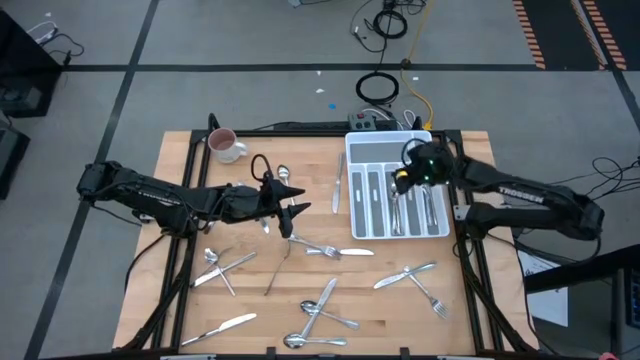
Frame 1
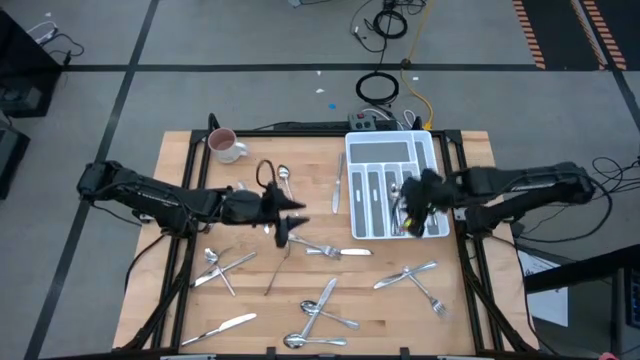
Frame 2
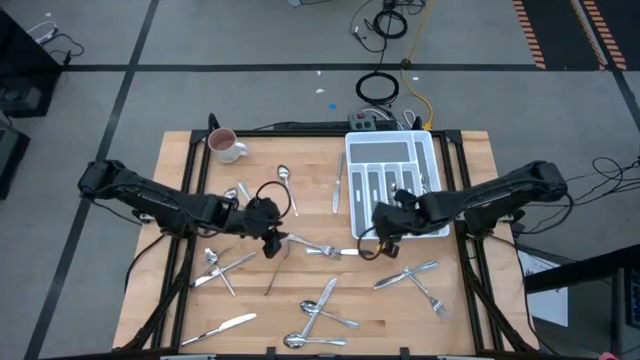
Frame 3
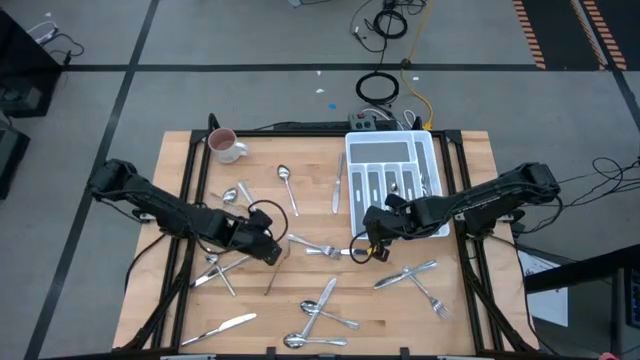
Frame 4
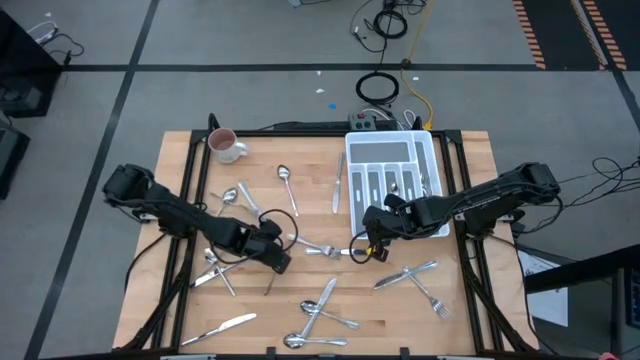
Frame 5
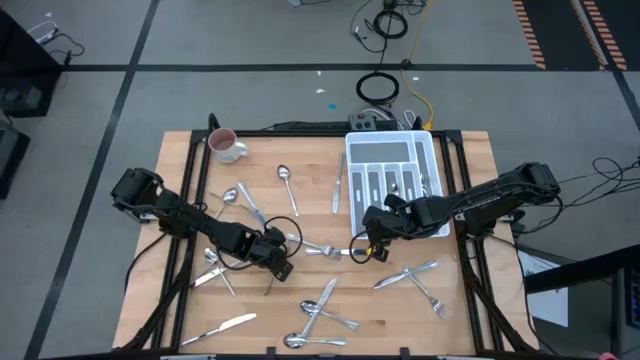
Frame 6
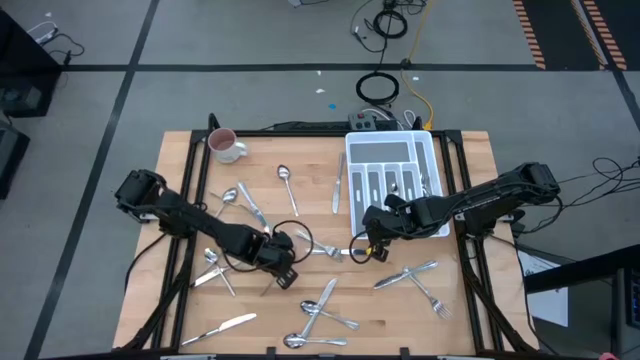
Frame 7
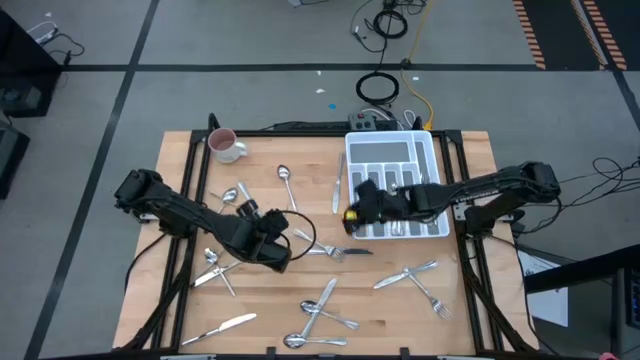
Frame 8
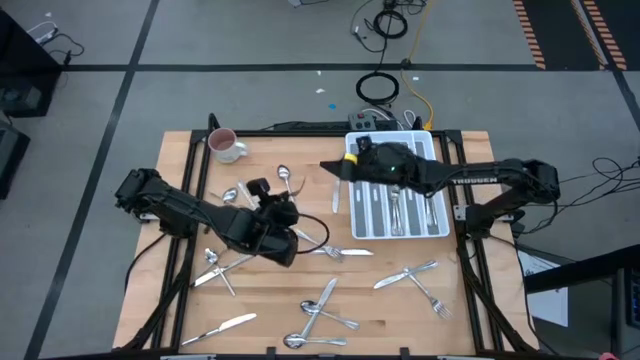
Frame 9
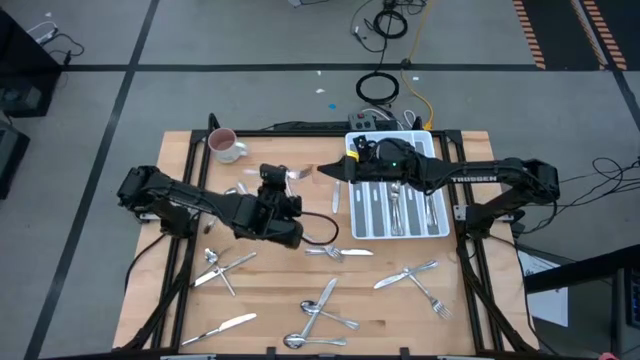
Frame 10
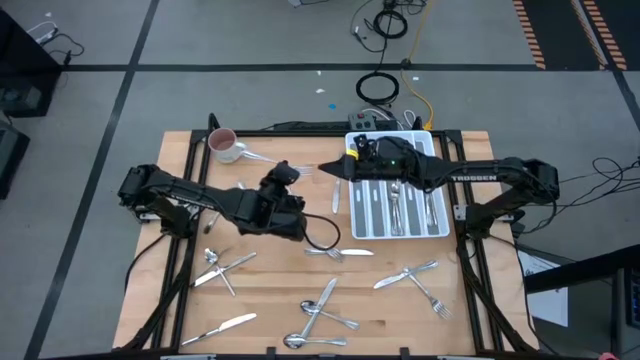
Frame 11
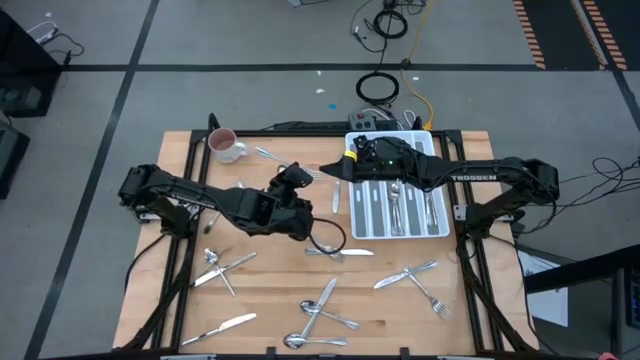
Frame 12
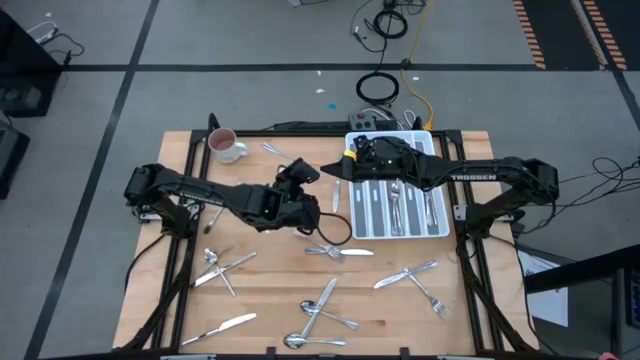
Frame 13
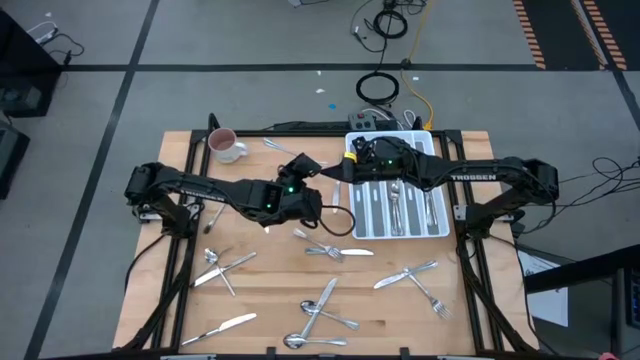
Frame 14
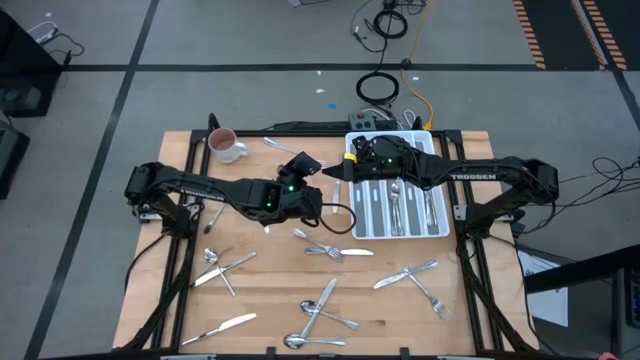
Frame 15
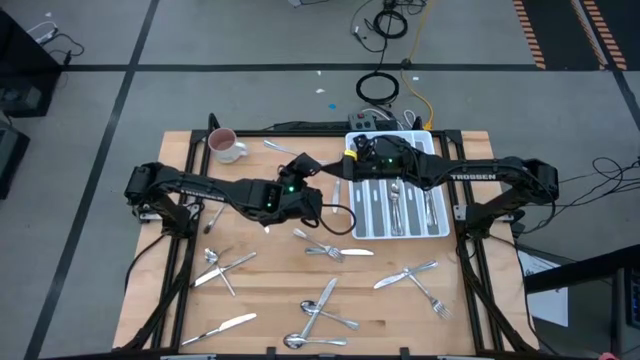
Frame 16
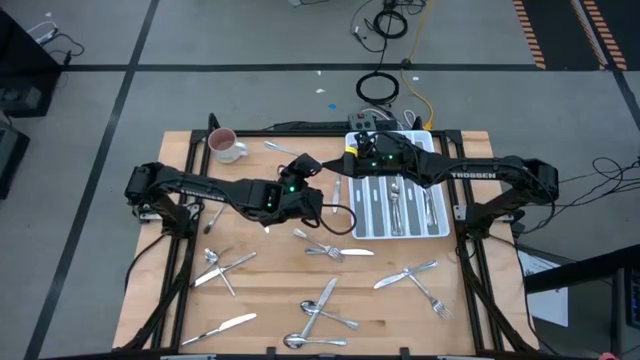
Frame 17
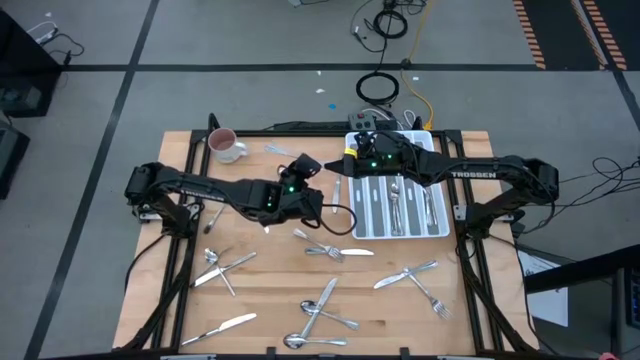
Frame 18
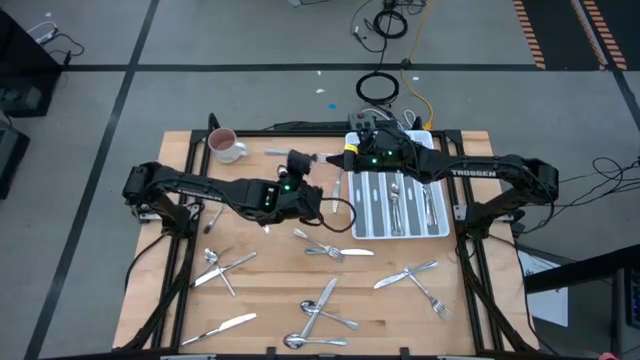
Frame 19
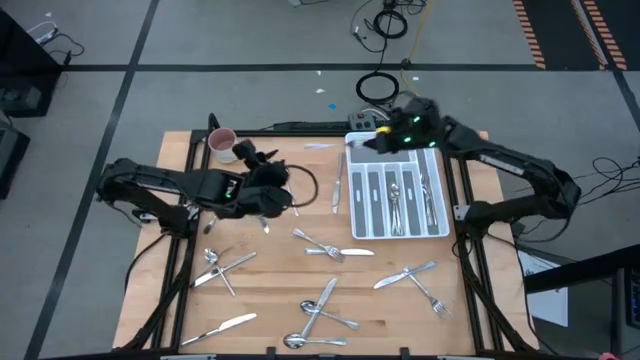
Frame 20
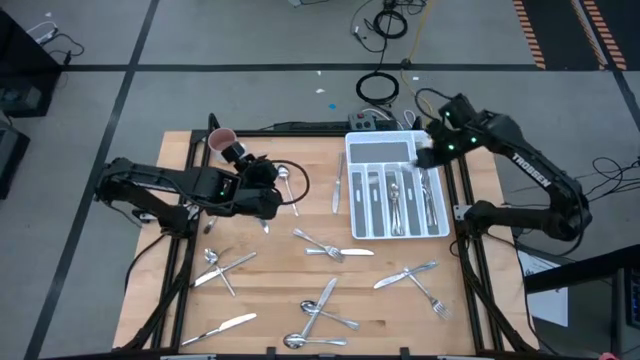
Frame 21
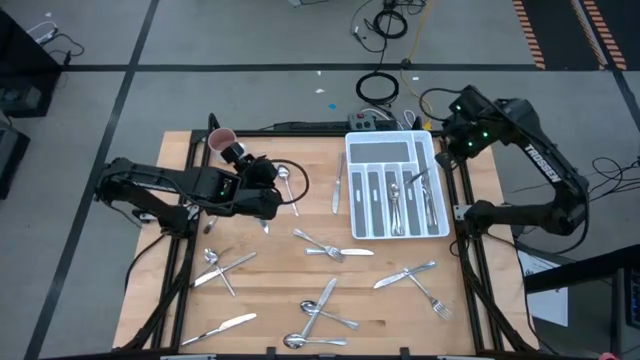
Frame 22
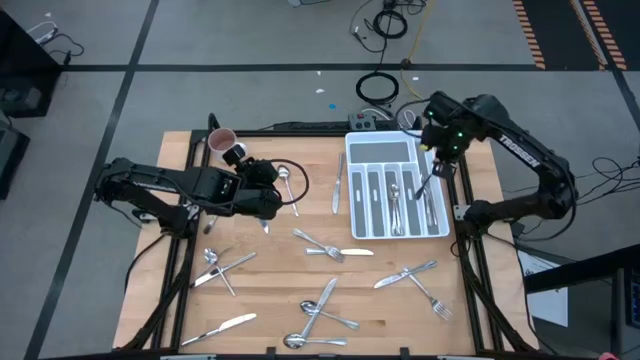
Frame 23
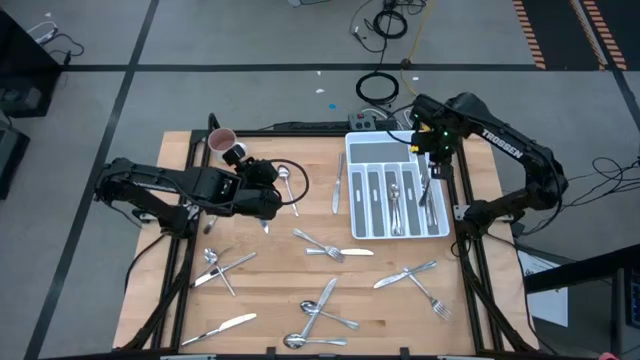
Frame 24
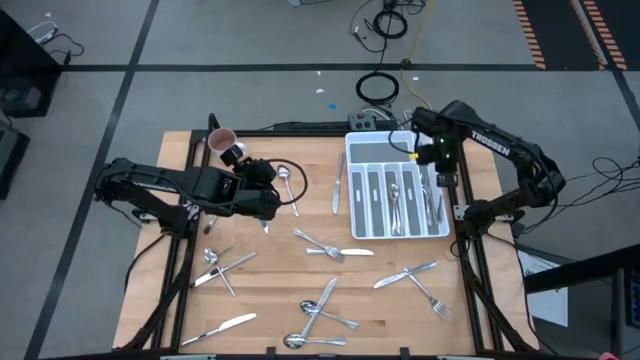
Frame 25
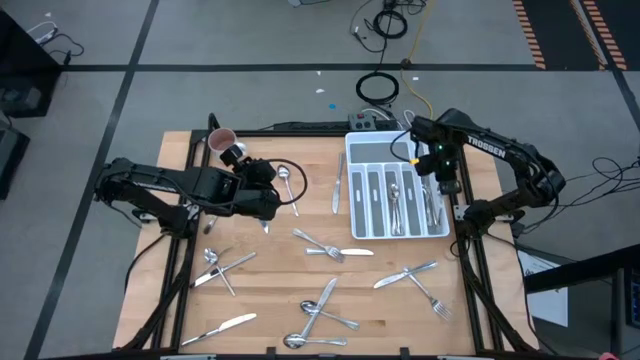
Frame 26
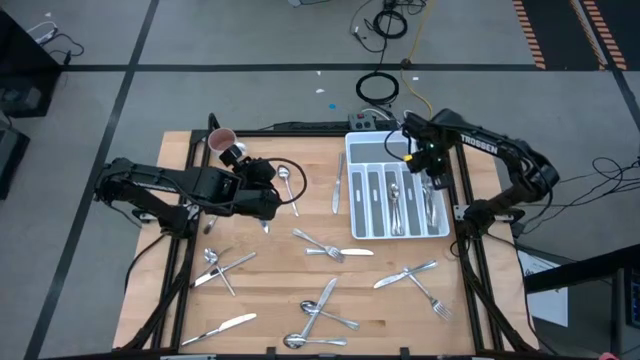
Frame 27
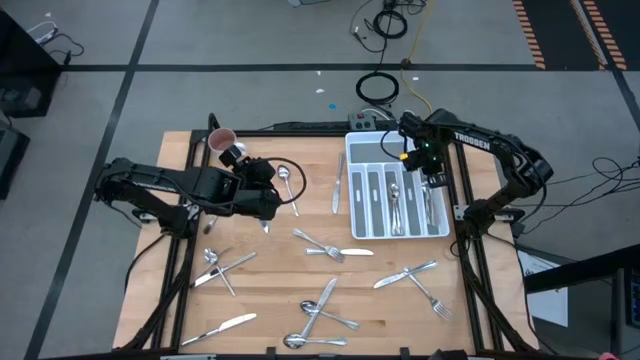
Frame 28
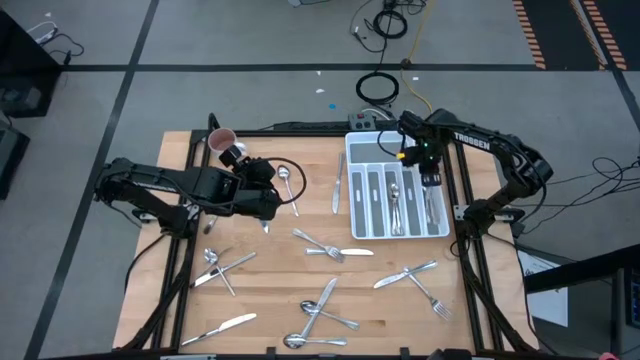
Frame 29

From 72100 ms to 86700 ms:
Task: Sort silverware
Put the fork in the right section of the silverware tray

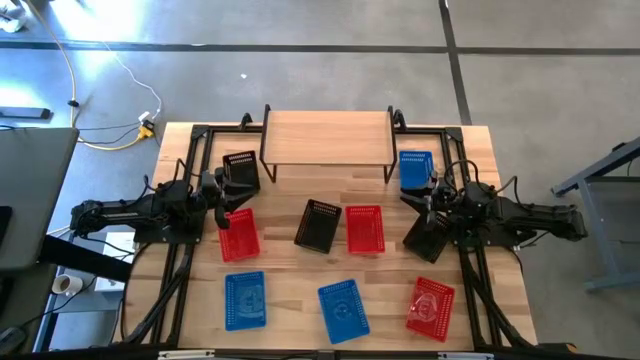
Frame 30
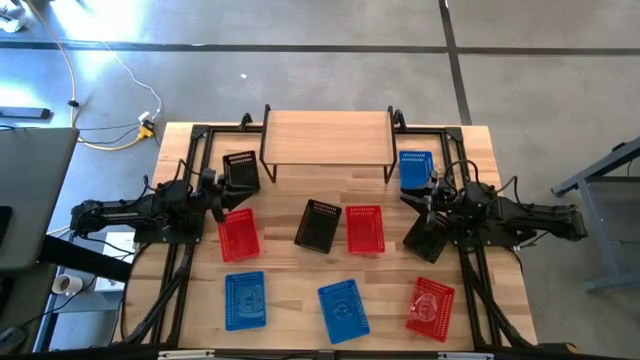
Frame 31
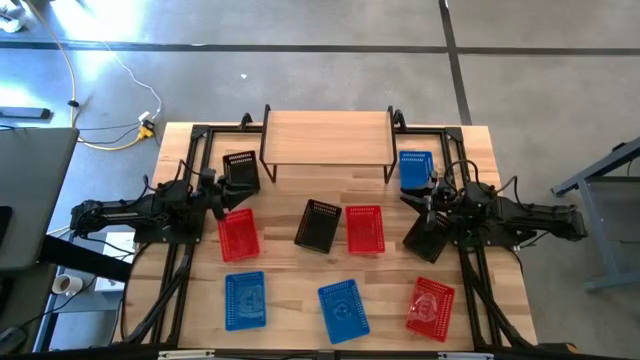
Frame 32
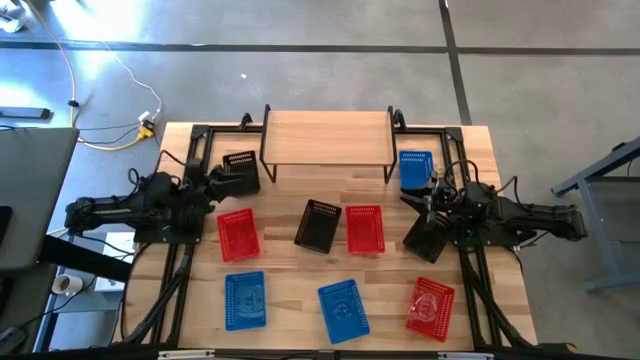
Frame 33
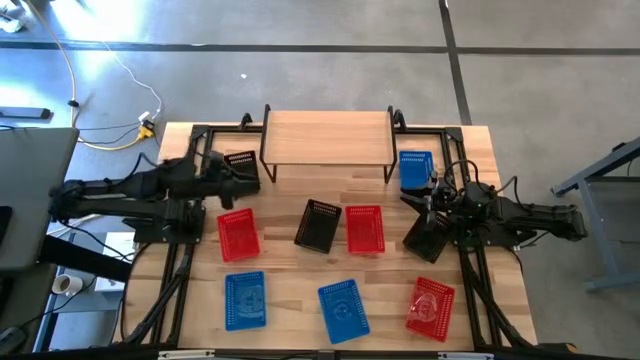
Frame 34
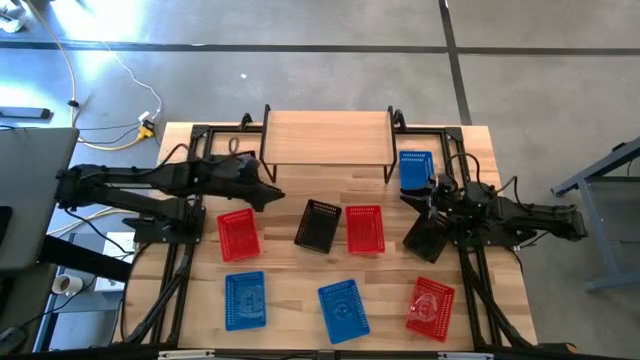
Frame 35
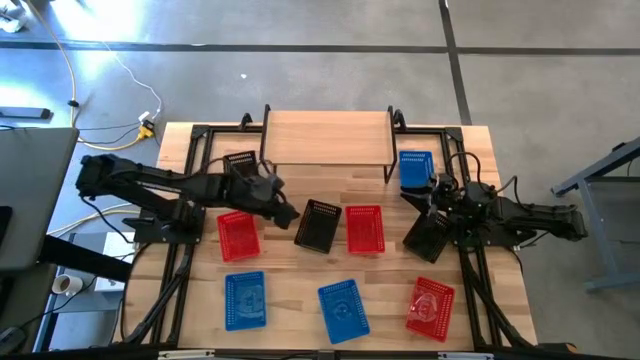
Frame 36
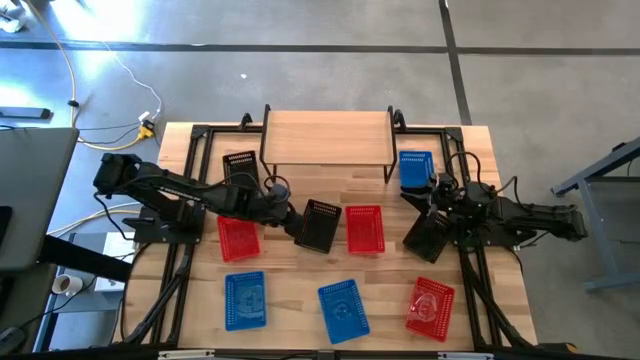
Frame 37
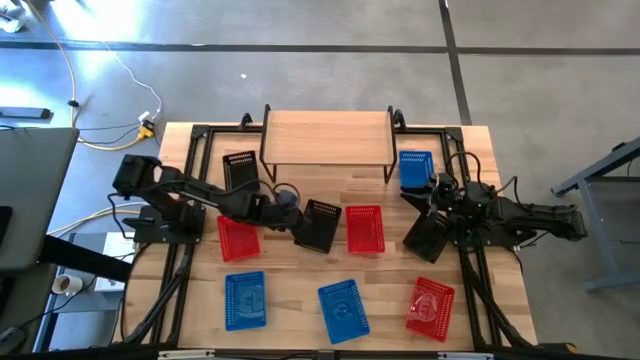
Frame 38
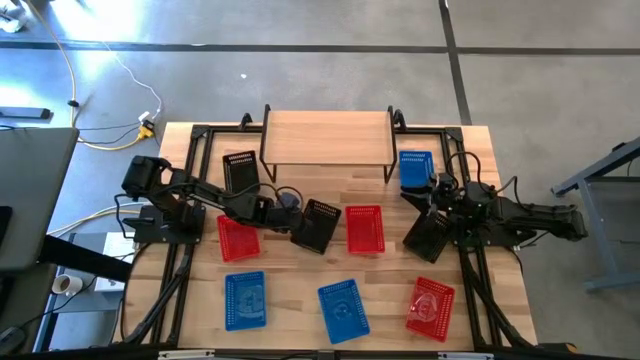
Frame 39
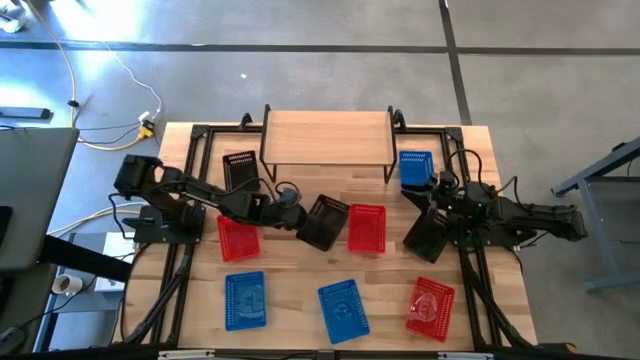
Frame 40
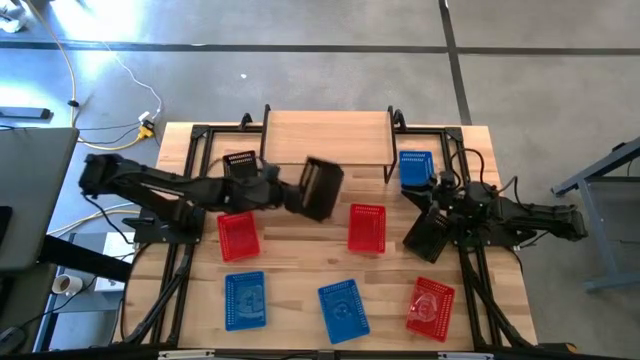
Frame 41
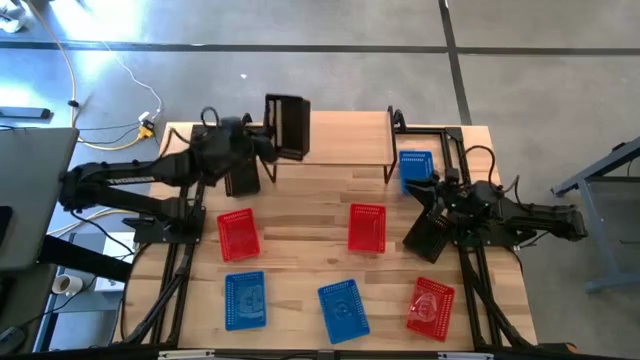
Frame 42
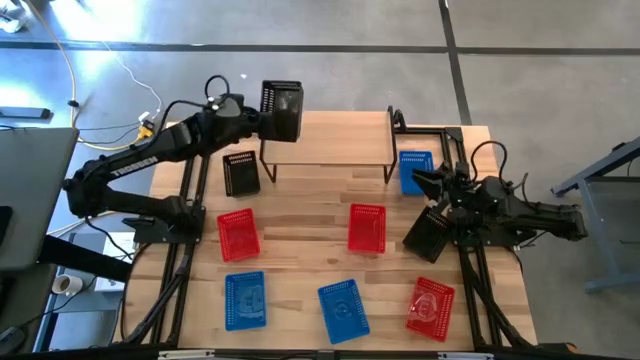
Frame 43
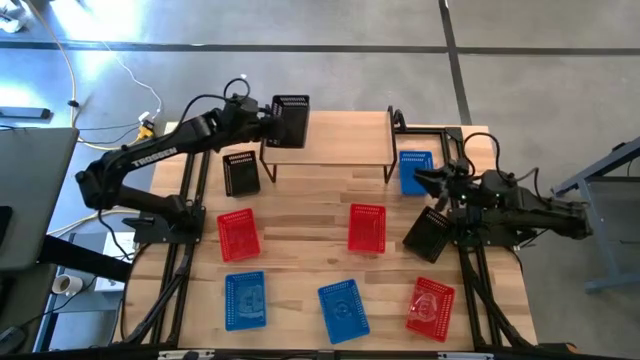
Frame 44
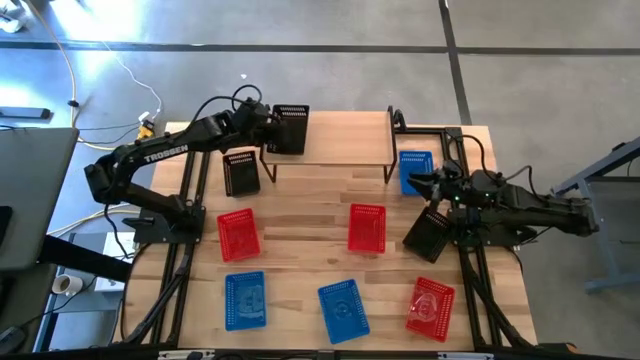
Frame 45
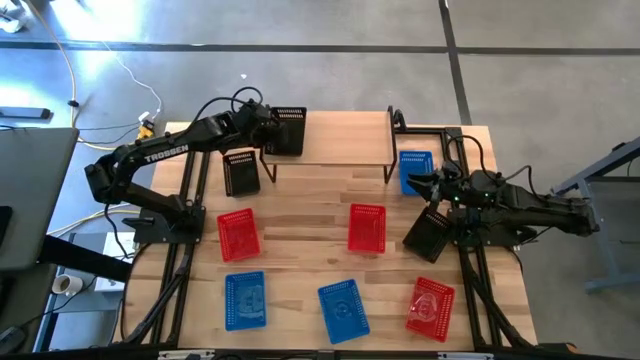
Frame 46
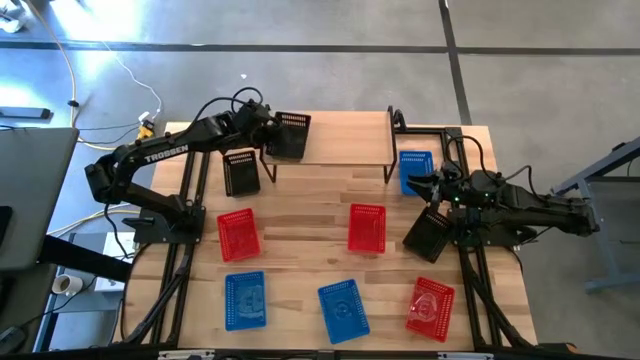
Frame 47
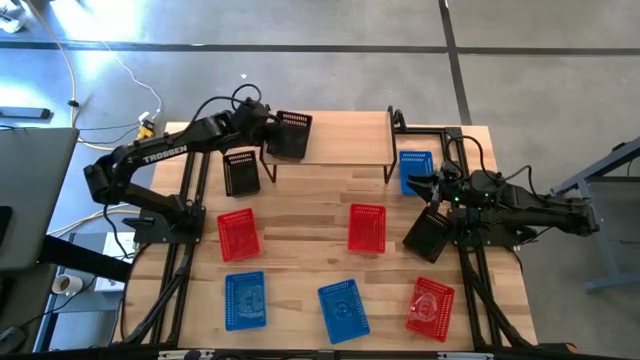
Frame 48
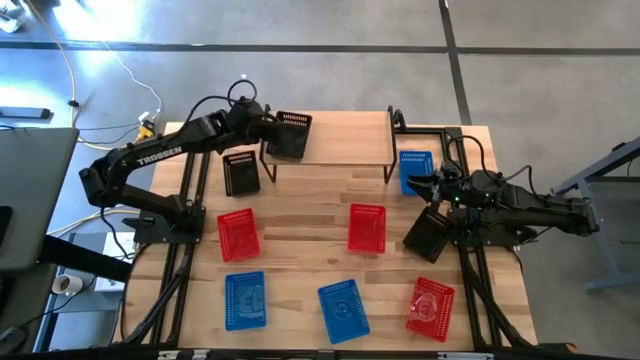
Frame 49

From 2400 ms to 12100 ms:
Task: Stack baskets on shelf by color
Put the bottom left black bin on the shelf
